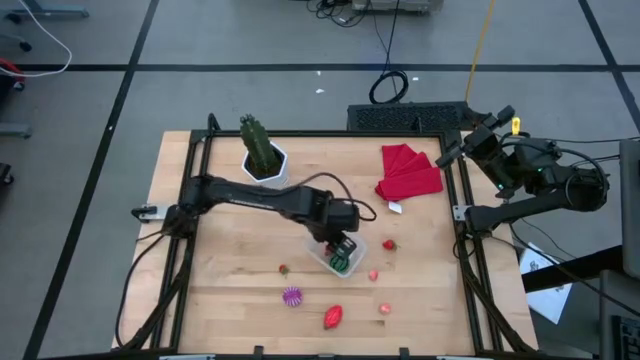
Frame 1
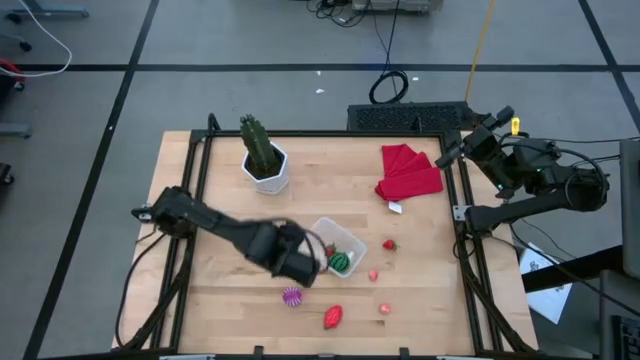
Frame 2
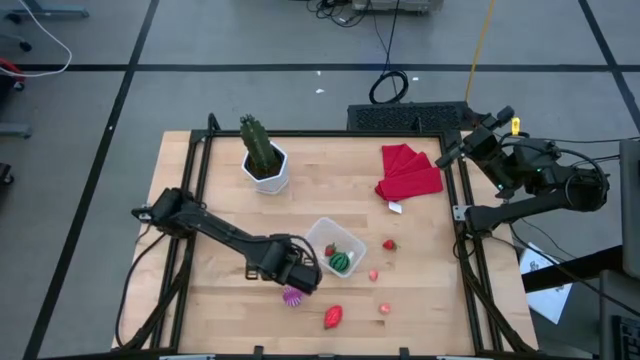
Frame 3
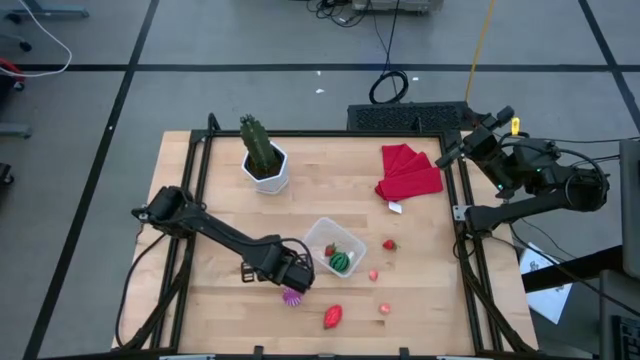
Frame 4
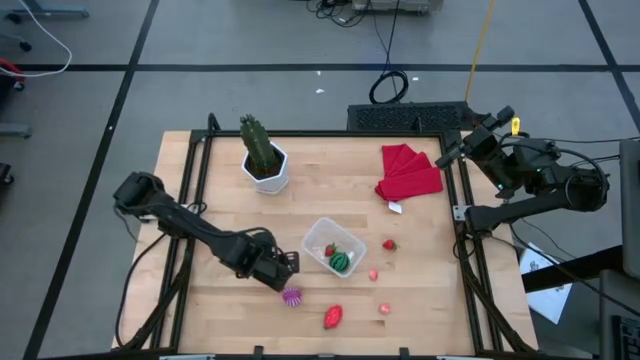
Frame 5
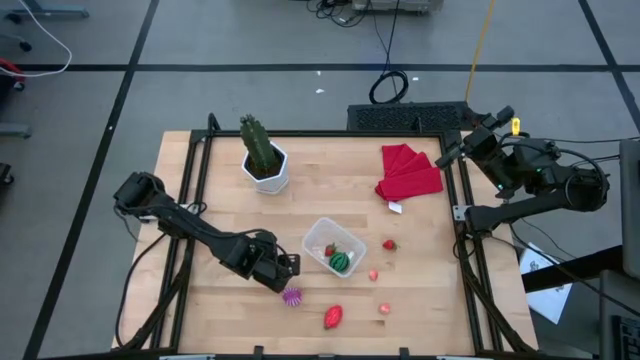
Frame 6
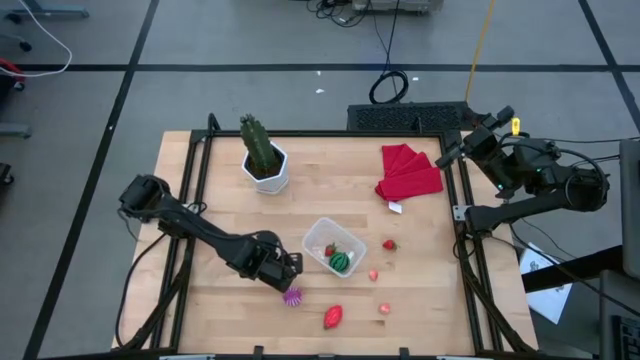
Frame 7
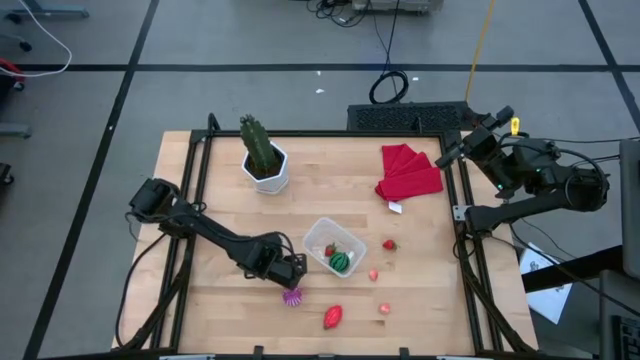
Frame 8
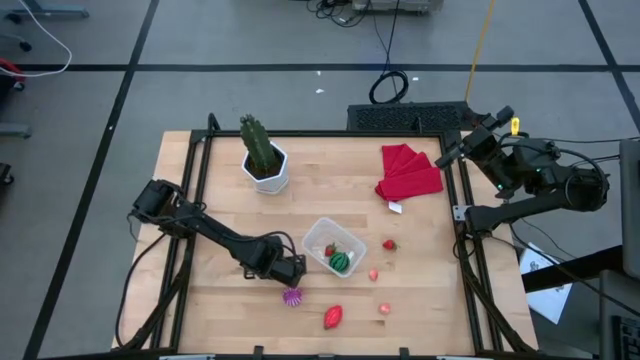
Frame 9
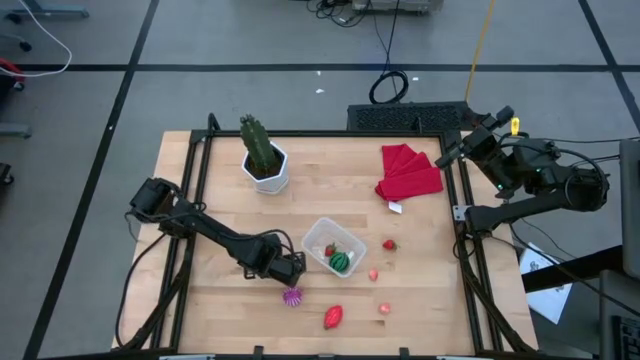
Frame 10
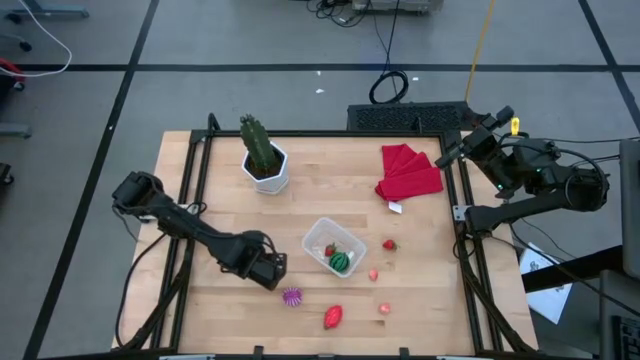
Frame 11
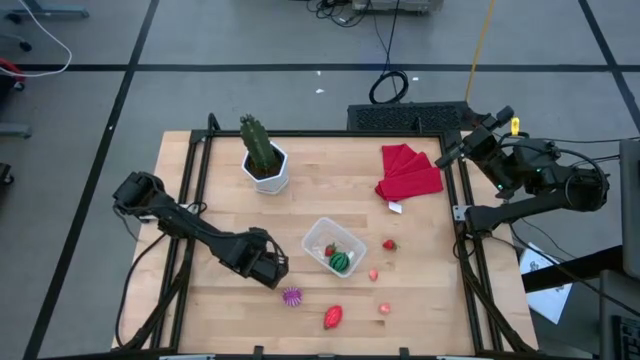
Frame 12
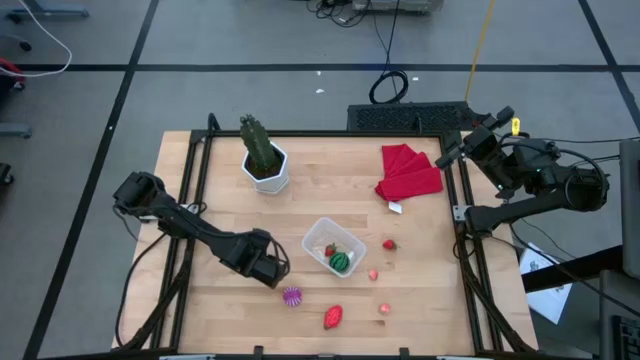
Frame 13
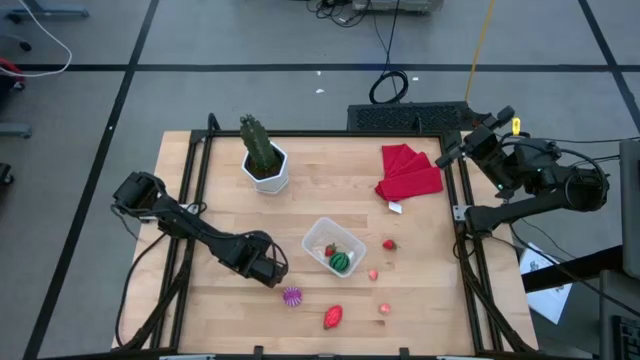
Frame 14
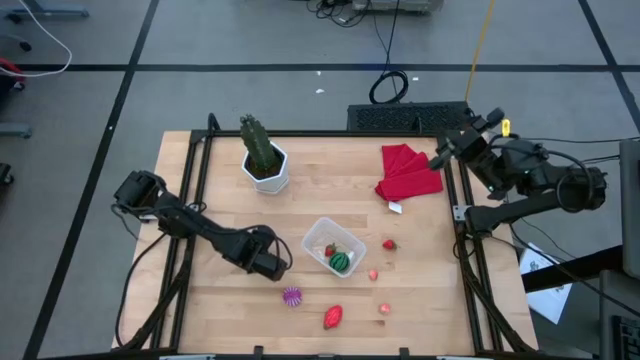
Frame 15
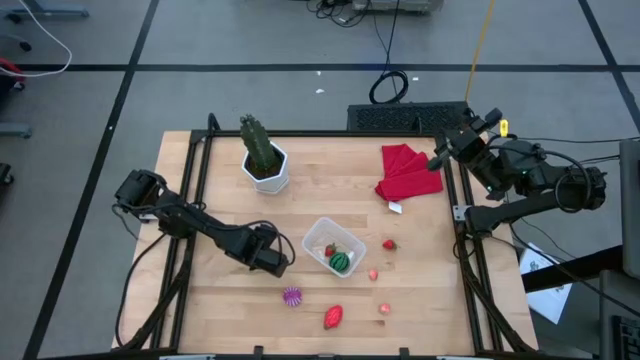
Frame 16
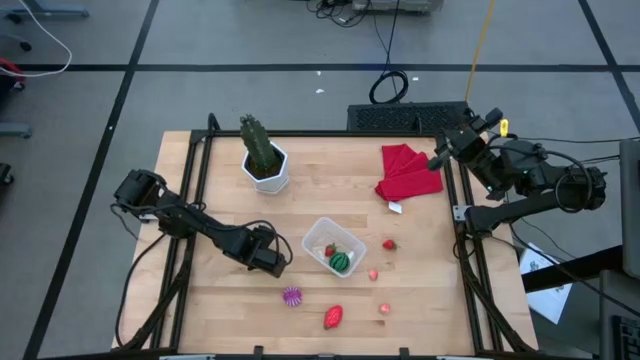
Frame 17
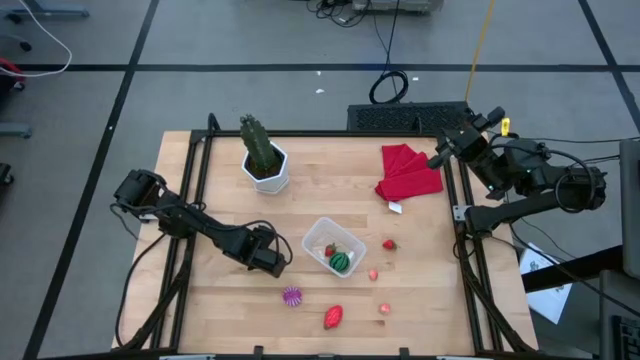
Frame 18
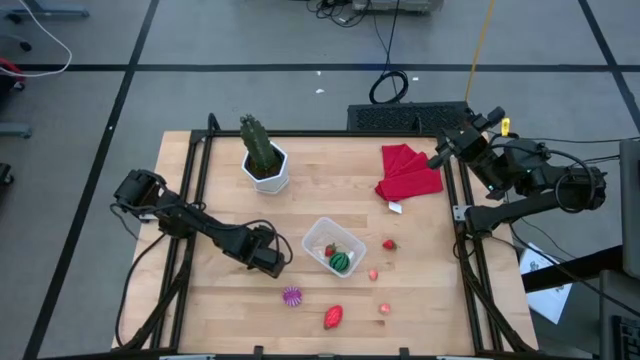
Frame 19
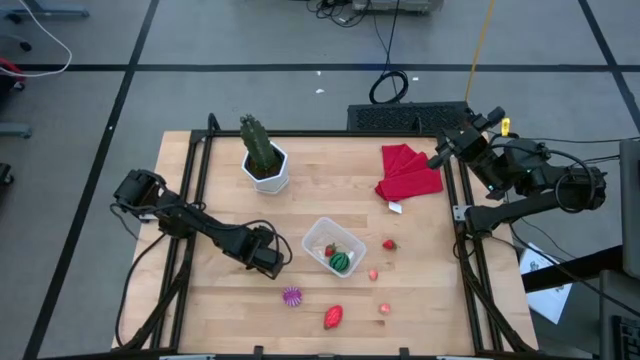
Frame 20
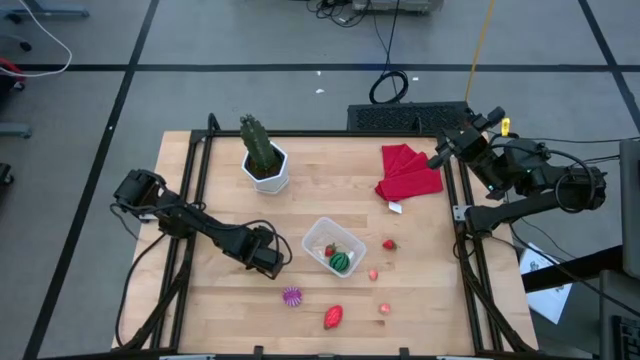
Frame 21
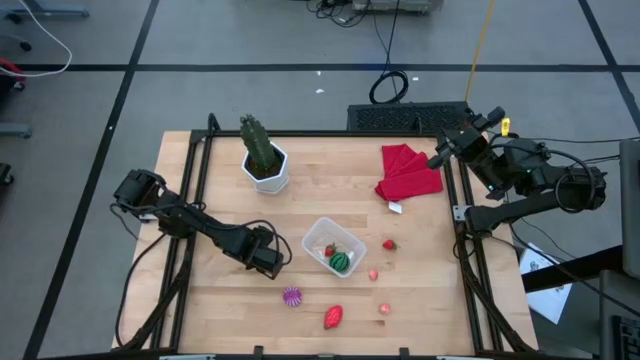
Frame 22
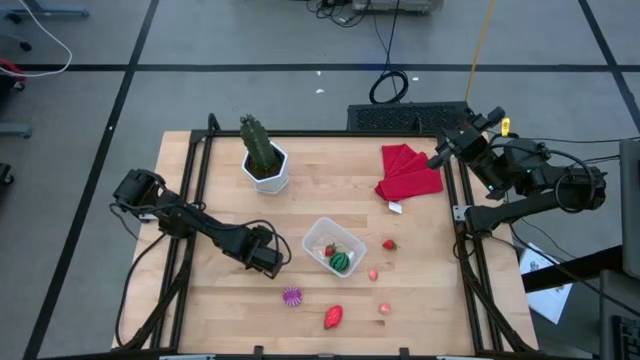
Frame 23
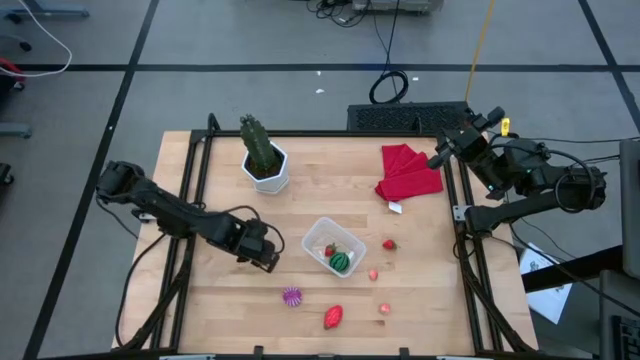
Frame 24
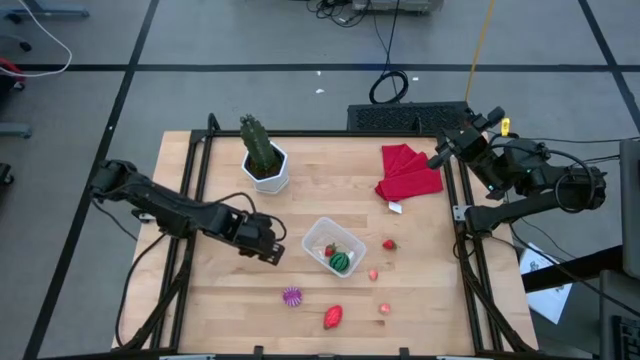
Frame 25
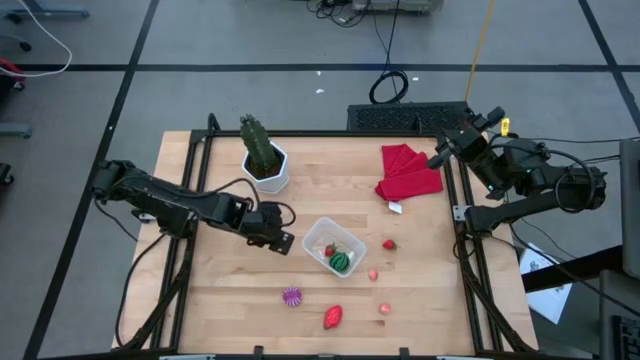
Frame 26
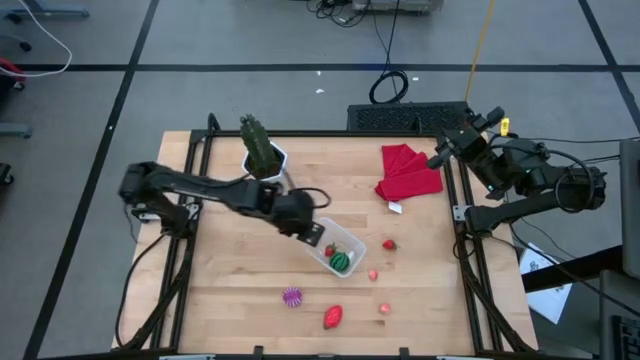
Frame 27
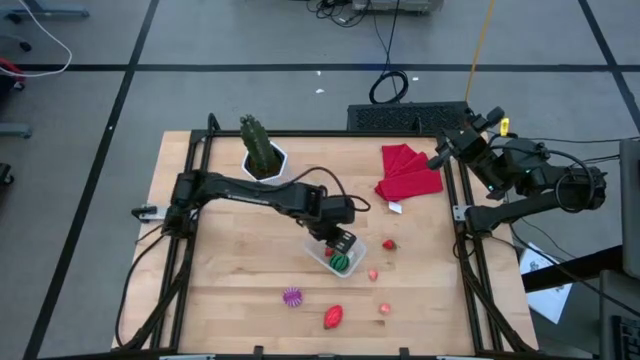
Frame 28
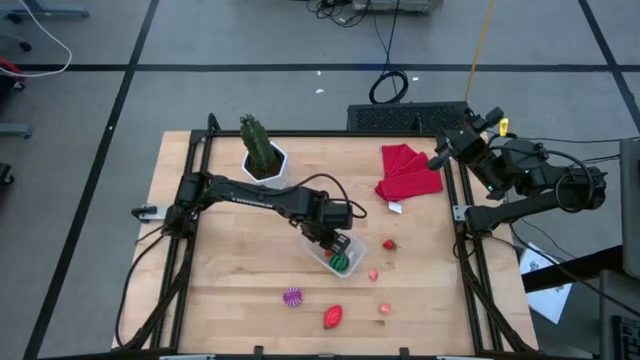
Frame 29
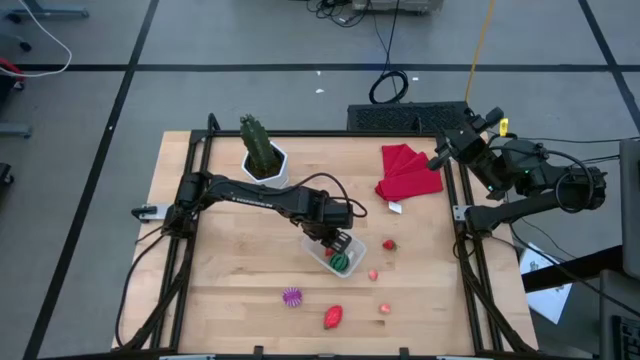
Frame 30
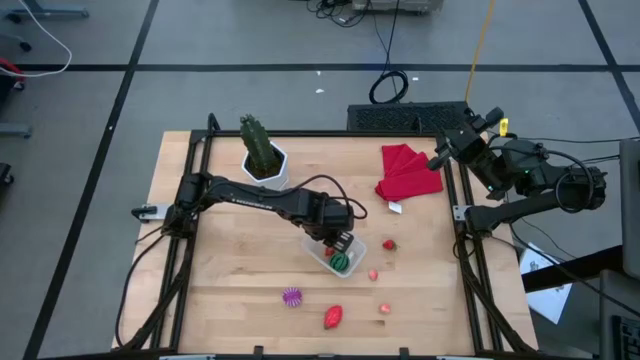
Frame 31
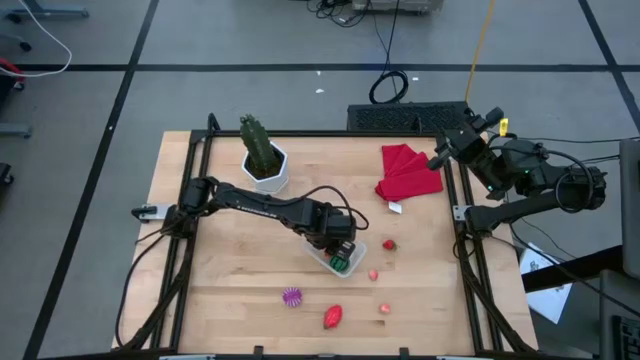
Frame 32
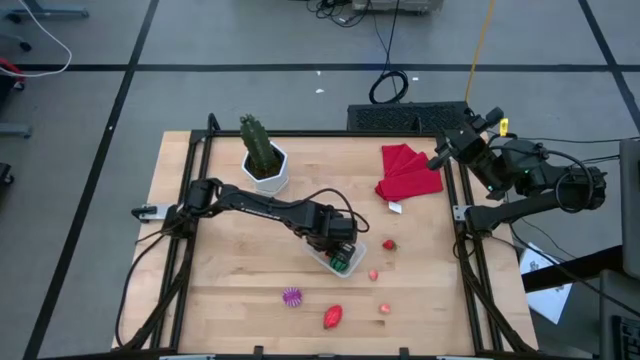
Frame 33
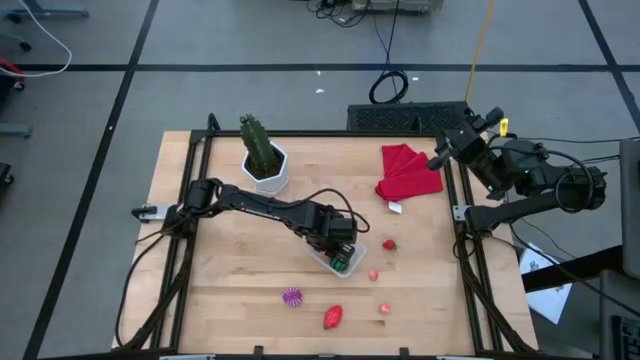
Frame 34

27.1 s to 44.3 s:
Task: Pick and placing Produce into tupperware
Put the bottom strawberry into the transparent bin

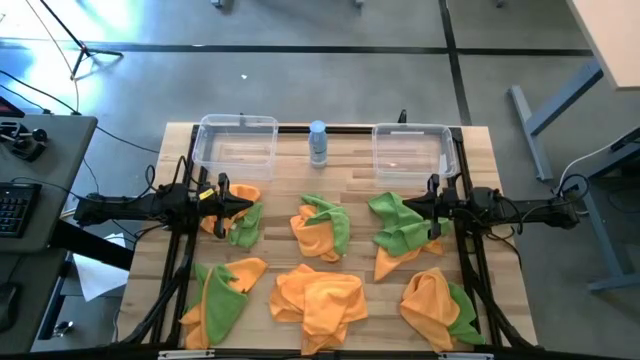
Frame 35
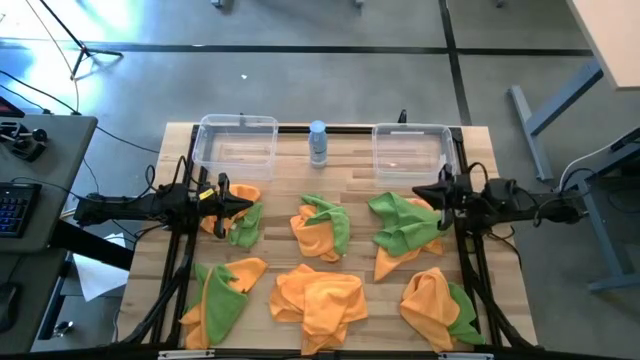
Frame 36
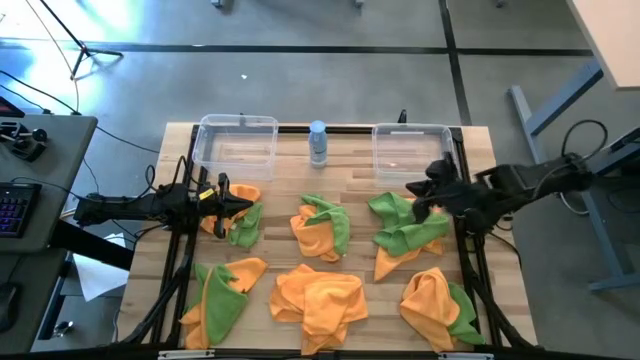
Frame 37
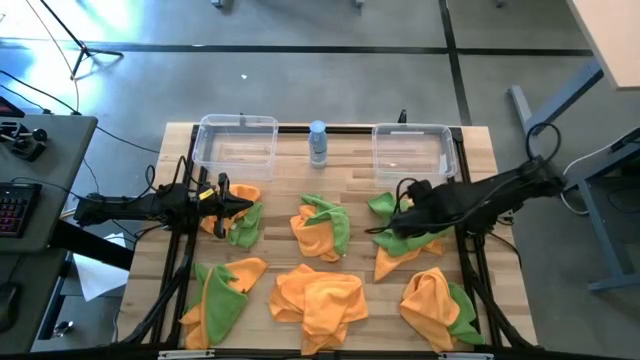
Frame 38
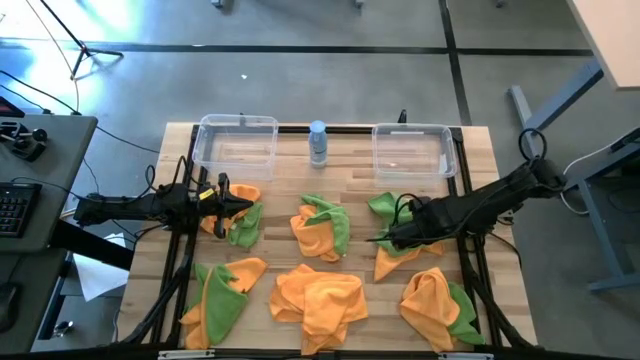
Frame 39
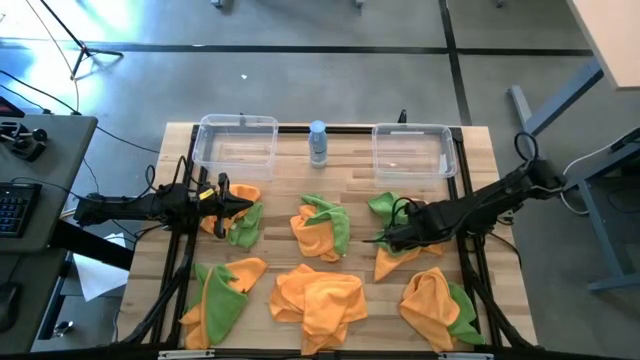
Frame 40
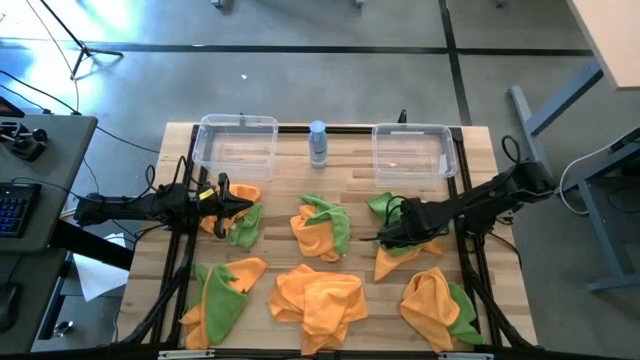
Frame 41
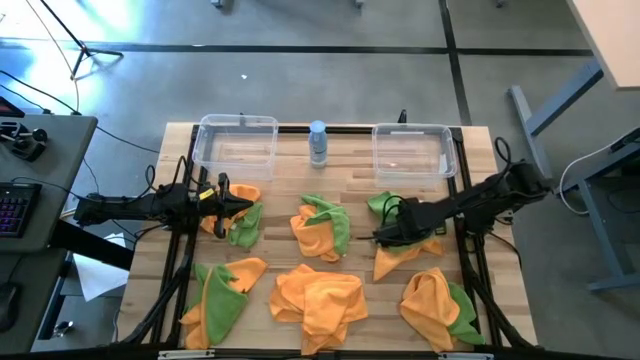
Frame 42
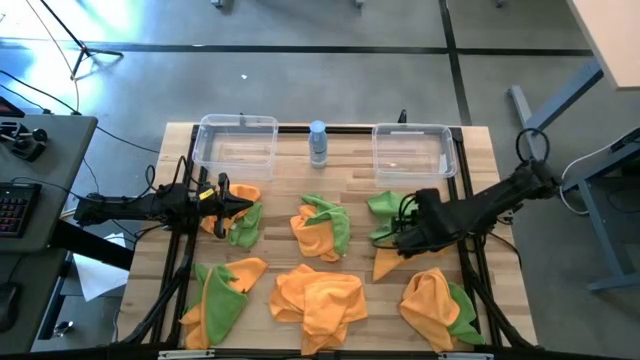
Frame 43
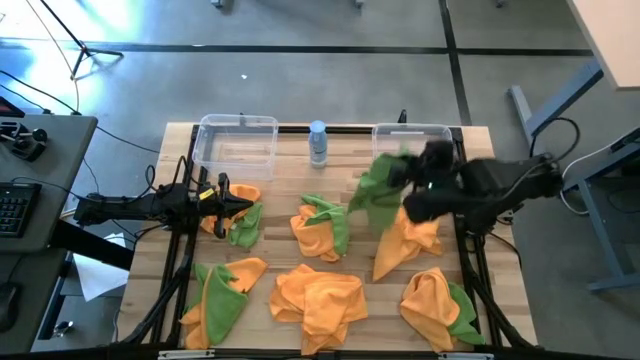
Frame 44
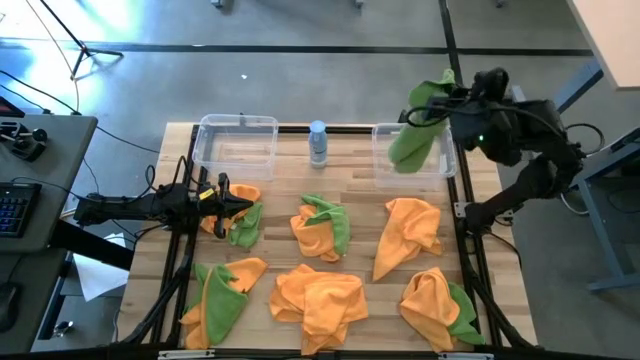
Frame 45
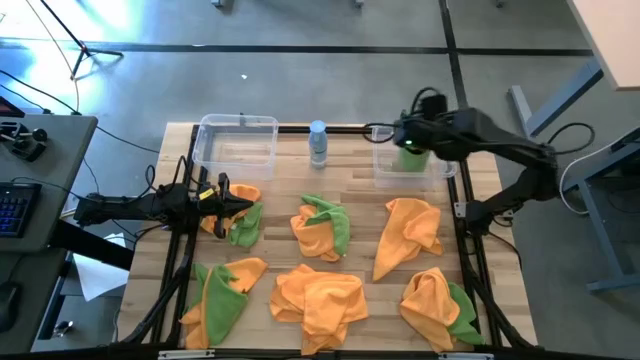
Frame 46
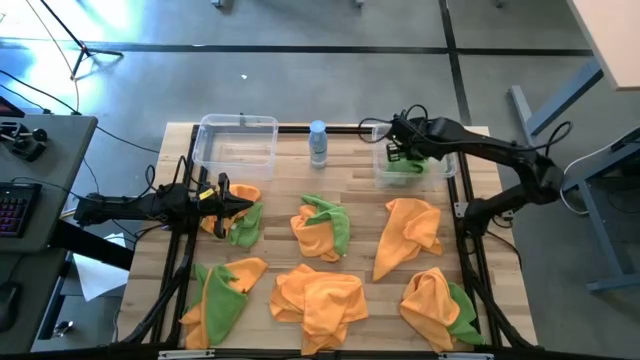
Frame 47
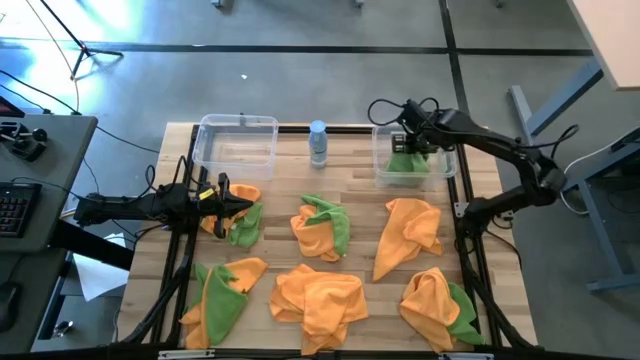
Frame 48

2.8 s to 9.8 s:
Task: Sort microfiber towel by color & place in baskets
Put the green towel into the right transparent bin
